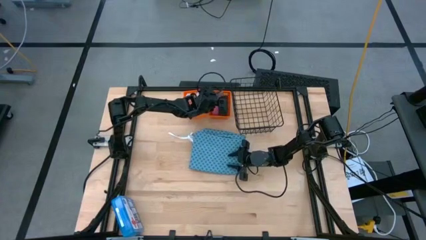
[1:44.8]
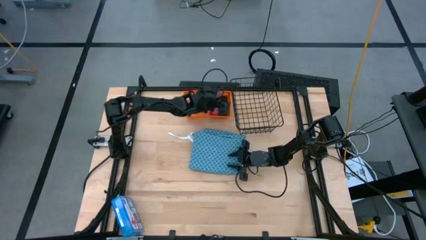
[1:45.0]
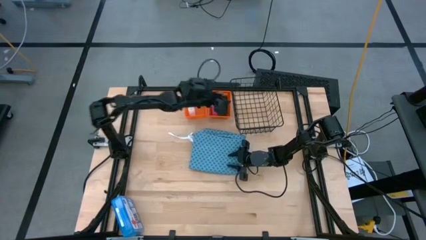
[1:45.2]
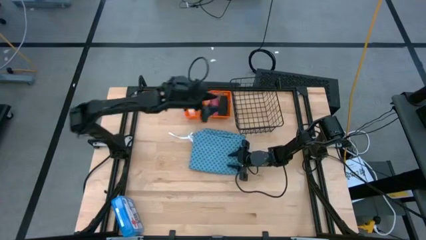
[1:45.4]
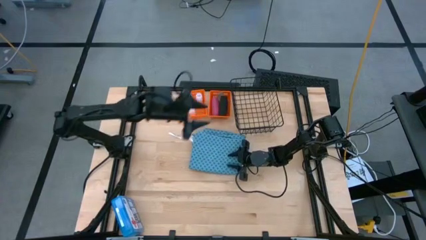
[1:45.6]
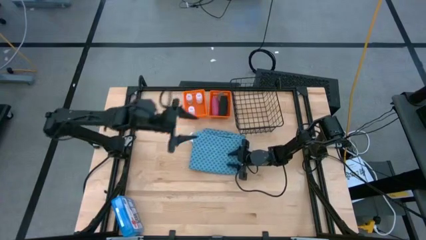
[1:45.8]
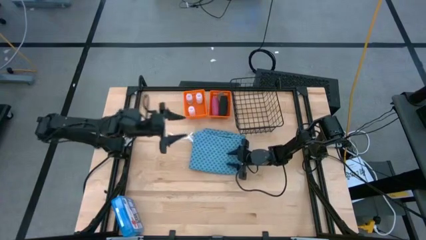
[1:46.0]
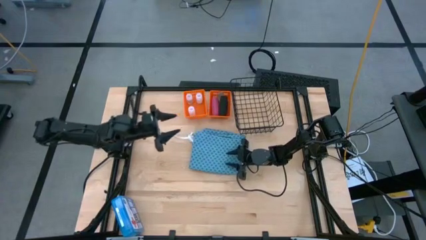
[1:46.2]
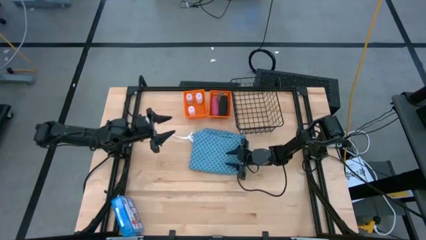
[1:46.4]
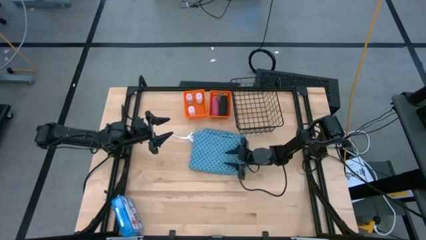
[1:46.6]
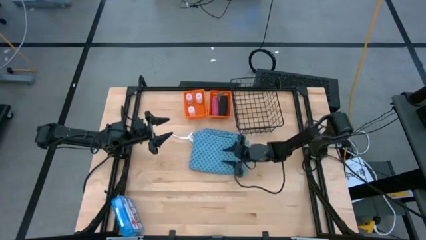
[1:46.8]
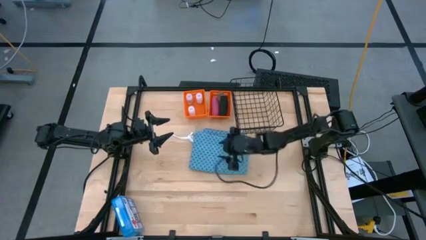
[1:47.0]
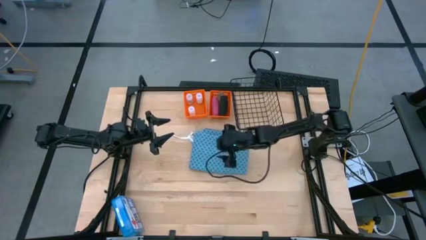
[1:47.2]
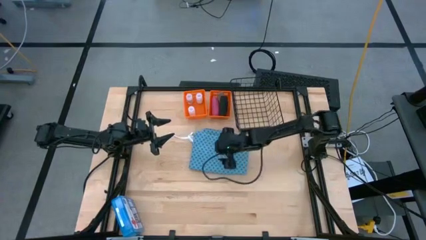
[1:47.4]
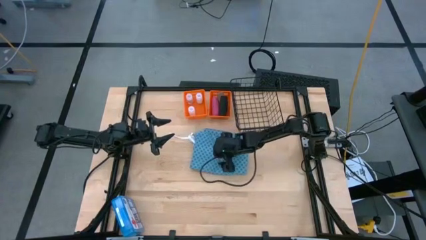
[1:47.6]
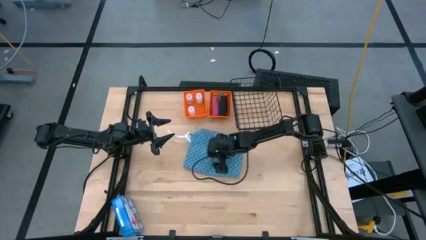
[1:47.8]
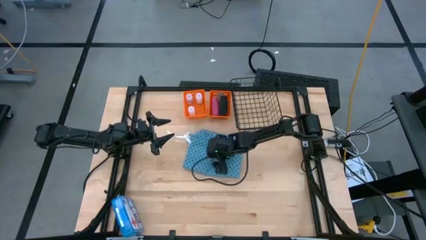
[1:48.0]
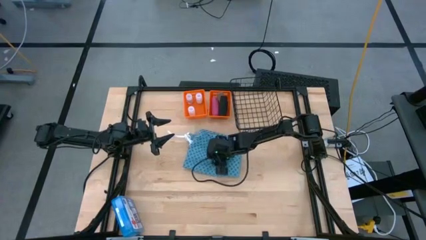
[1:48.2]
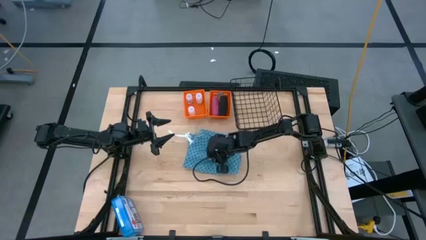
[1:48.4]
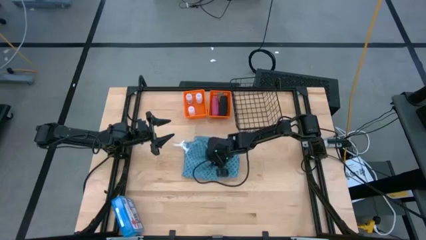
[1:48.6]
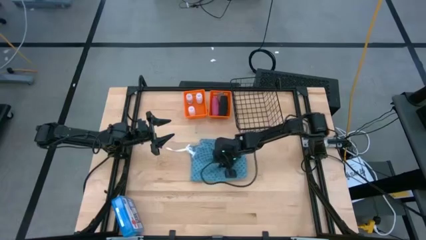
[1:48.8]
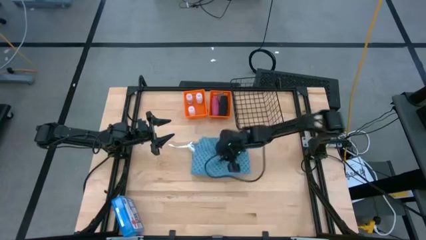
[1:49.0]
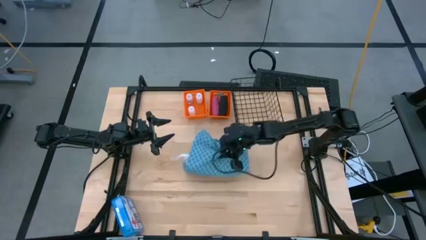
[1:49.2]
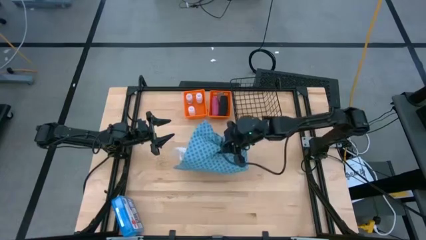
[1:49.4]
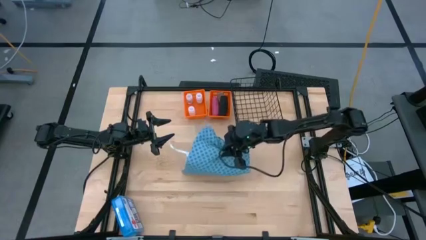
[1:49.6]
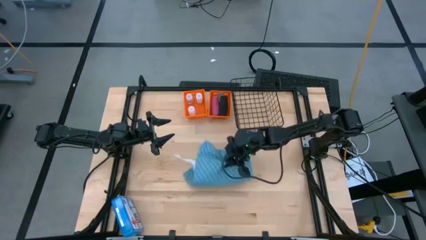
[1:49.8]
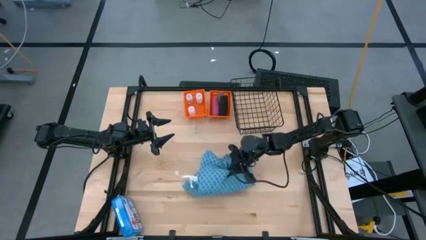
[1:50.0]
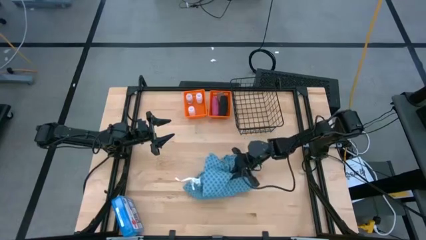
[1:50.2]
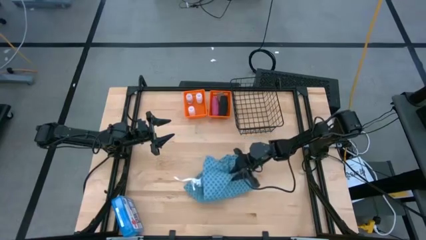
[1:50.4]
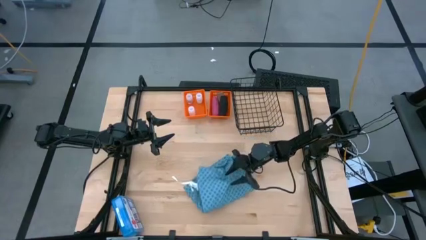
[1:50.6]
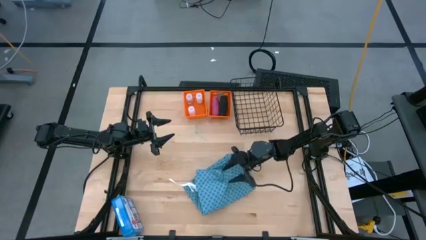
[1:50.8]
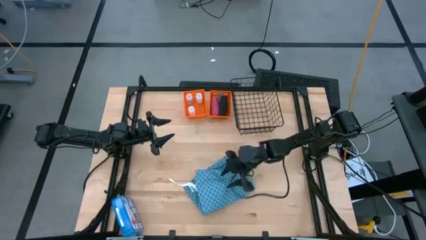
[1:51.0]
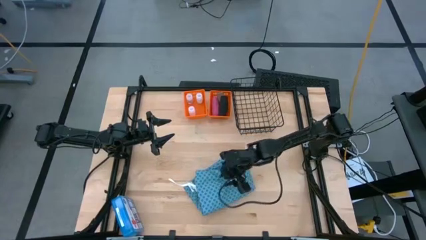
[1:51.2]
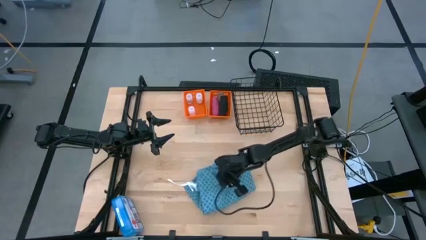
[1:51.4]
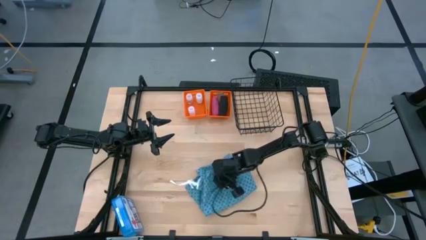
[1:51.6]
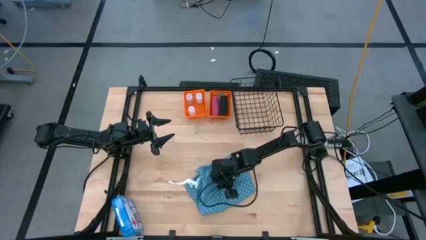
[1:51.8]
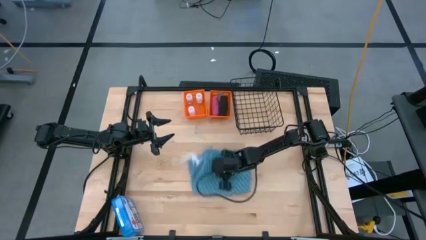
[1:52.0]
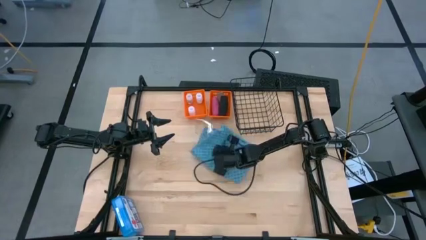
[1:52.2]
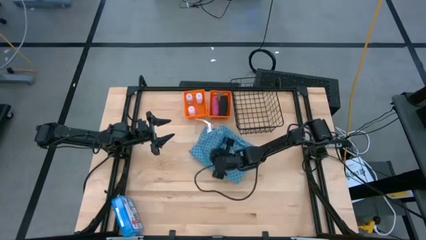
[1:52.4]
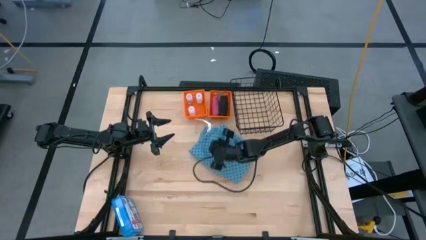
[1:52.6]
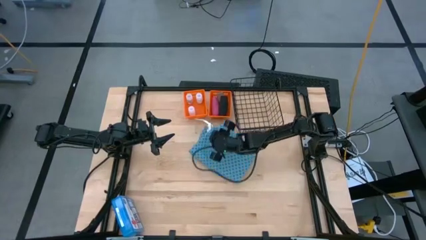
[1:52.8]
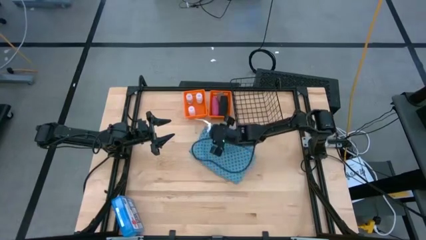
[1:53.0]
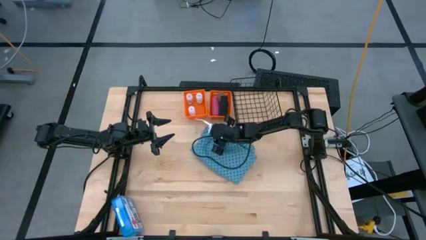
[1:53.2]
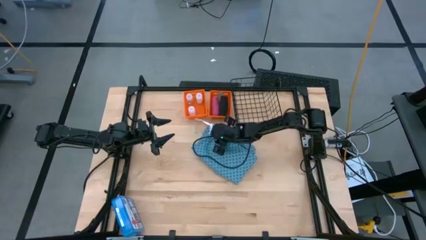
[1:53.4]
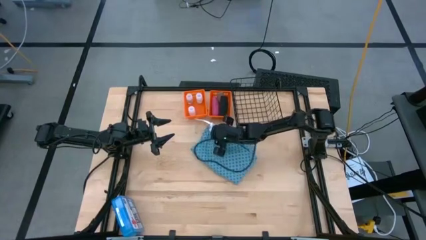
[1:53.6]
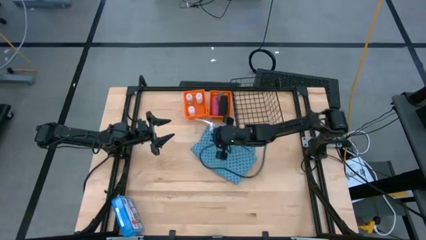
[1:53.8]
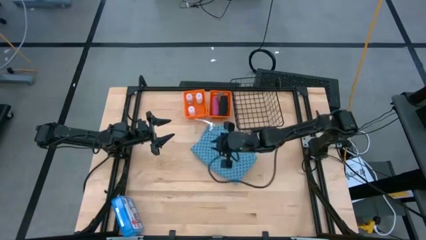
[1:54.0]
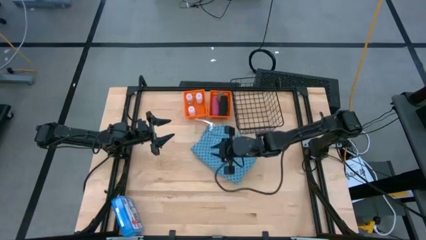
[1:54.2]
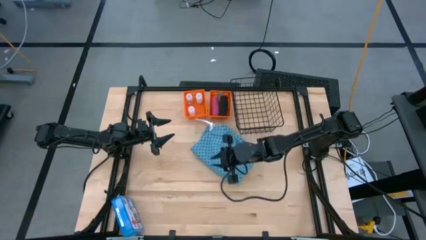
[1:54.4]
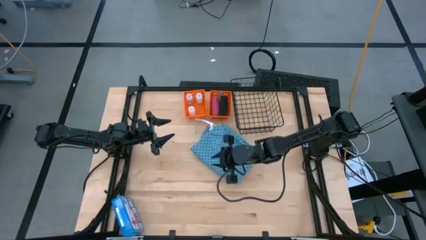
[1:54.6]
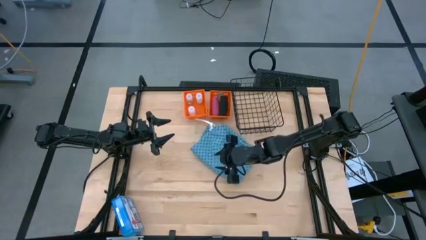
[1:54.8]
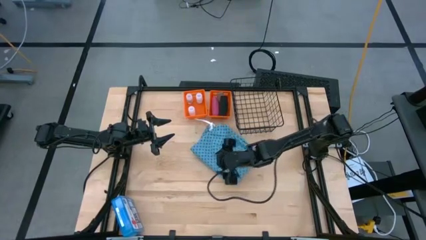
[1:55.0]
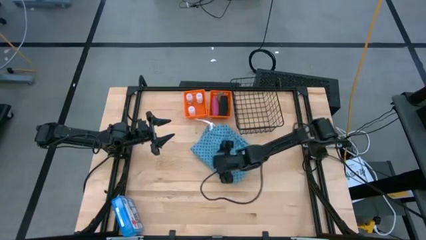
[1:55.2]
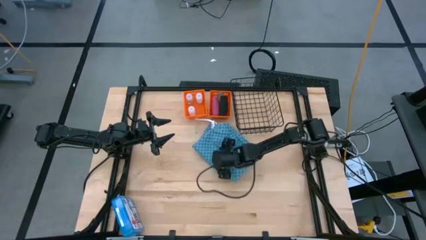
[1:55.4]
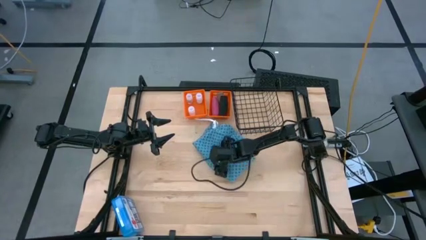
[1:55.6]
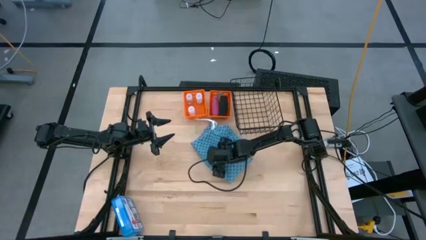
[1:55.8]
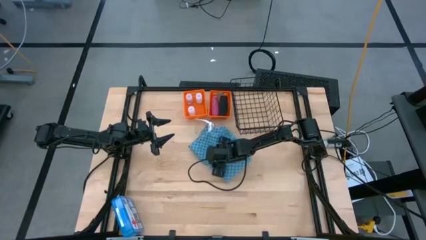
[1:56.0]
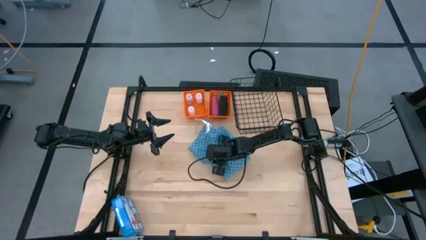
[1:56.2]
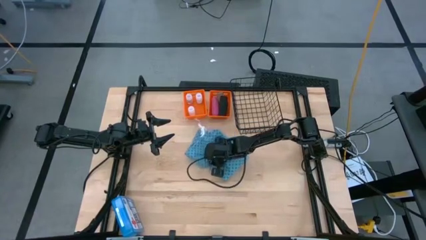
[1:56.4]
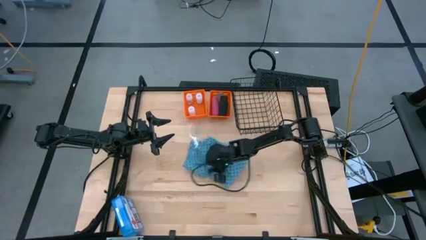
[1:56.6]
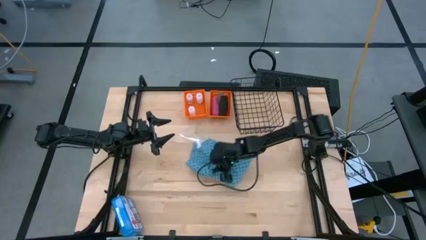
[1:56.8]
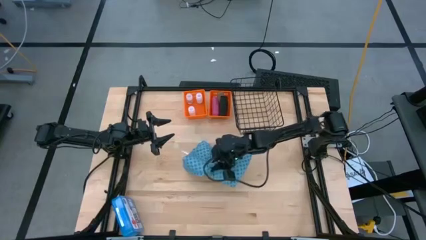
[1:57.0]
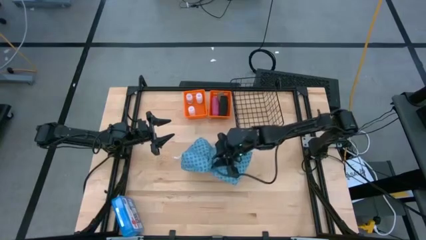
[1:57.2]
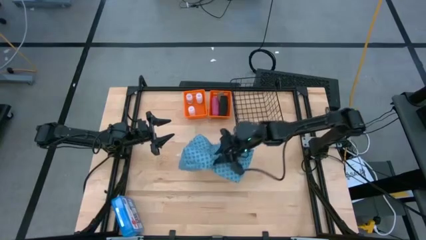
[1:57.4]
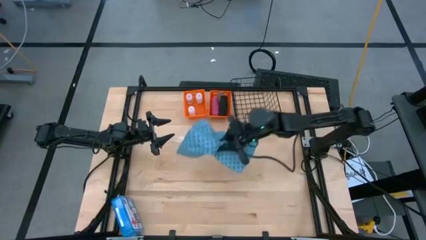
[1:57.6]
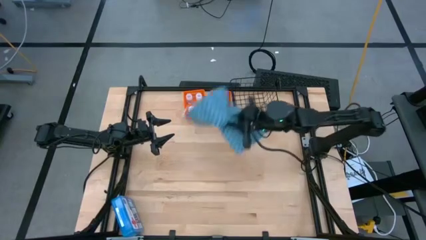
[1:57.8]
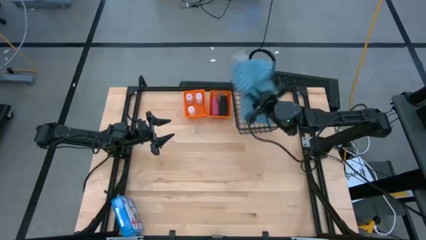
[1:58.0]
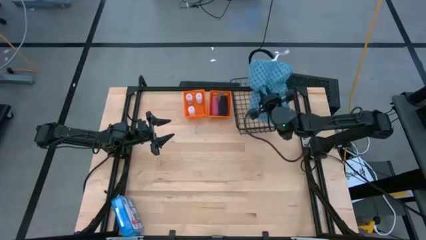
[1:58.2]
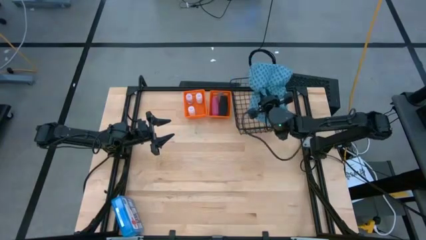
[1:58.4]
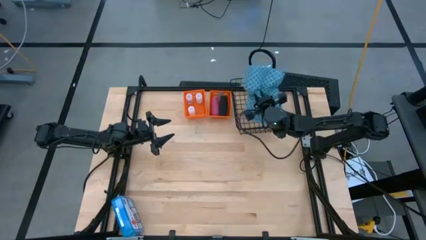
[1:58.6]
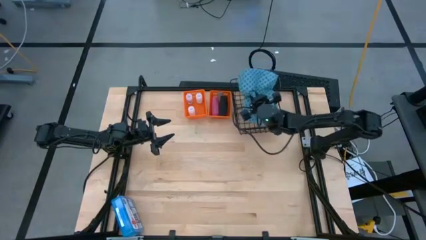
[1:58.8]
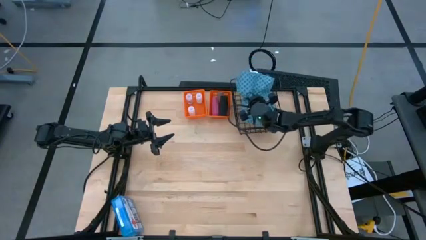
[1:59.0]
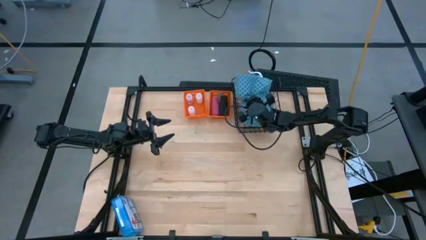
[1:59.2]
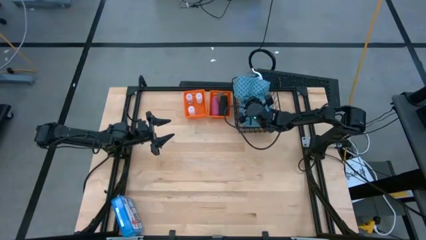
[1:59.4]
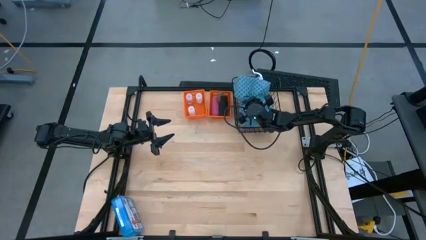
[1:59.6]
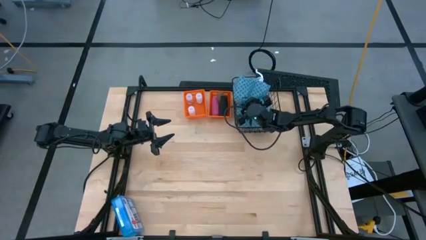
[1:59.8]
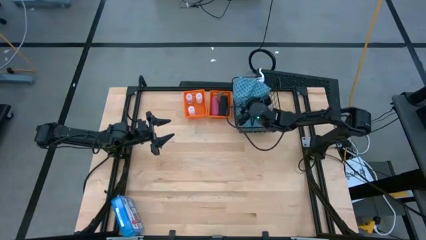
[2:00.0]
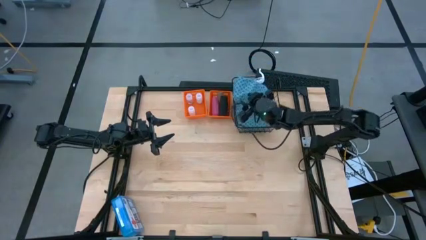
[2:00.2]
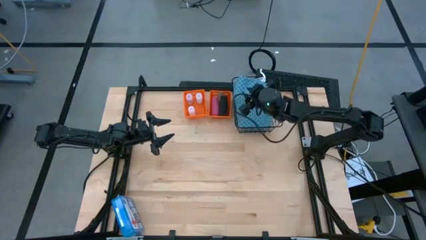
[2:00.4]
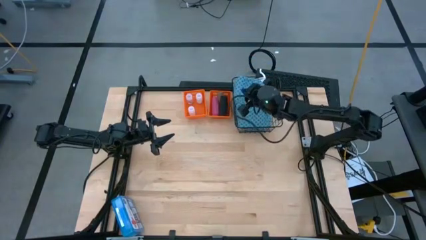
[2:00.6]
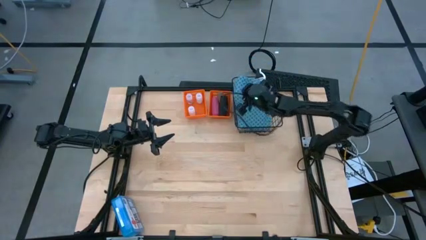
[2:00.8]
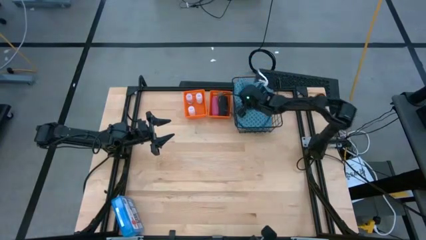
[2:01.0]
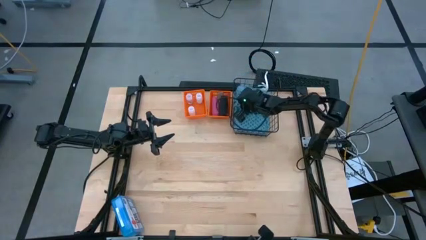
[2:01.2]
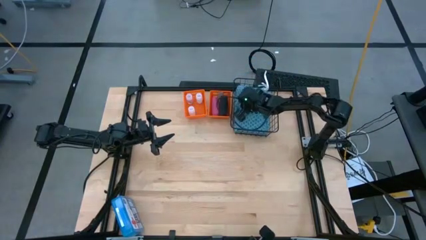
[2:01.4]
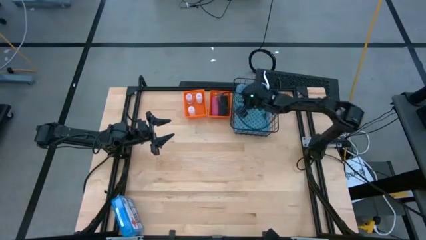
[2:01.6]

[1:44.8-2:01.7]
Task: Pick & Place Medicine items
Put the blue patient gown into the black basket
